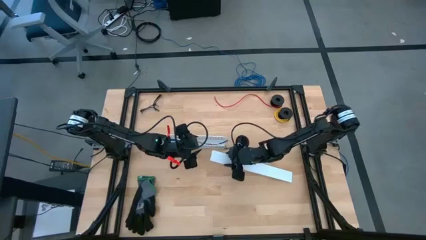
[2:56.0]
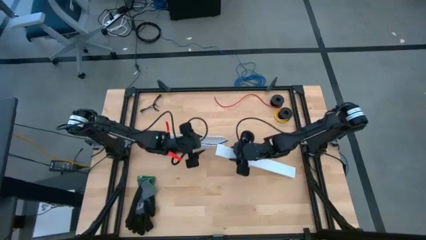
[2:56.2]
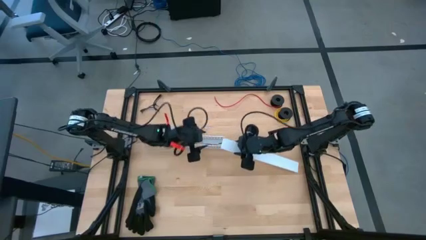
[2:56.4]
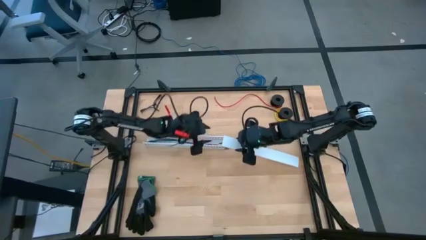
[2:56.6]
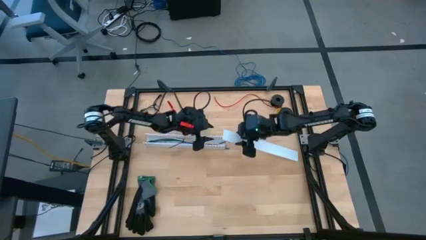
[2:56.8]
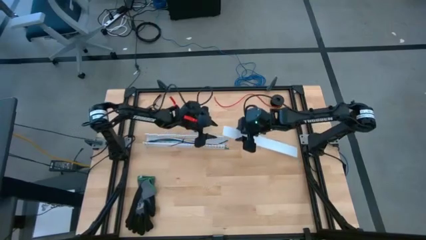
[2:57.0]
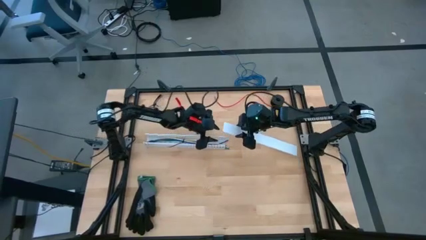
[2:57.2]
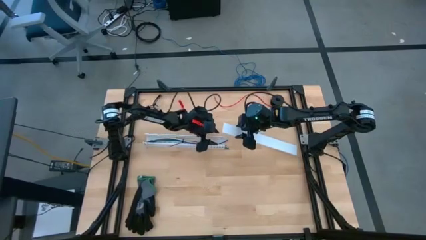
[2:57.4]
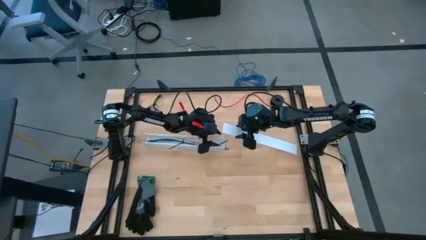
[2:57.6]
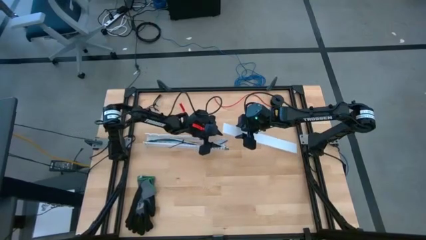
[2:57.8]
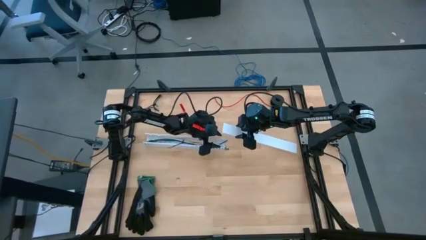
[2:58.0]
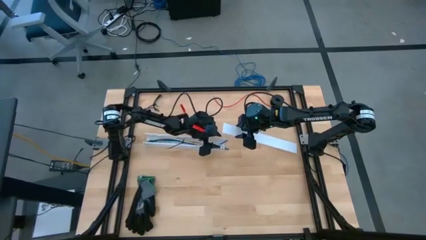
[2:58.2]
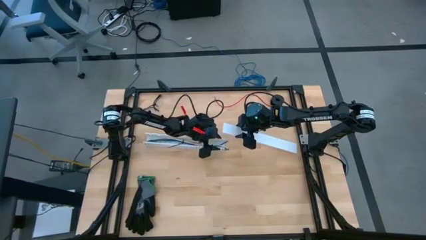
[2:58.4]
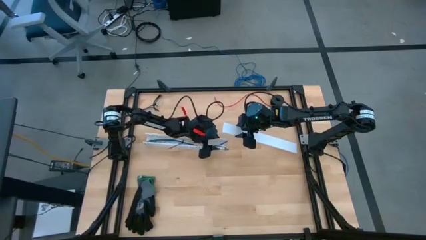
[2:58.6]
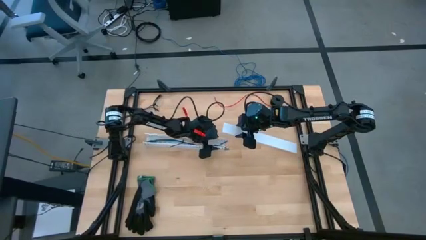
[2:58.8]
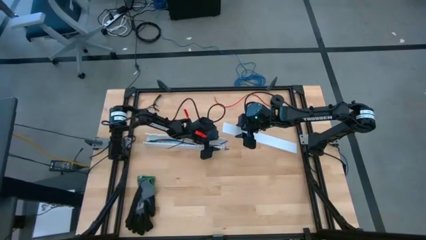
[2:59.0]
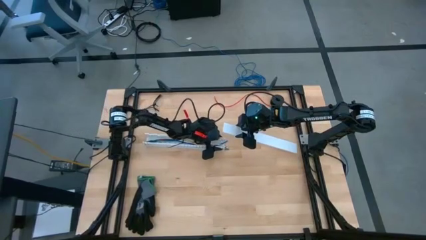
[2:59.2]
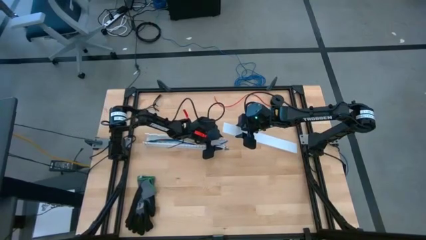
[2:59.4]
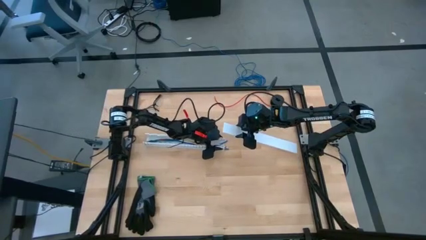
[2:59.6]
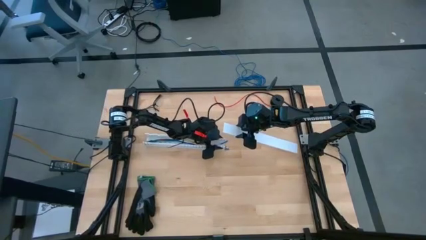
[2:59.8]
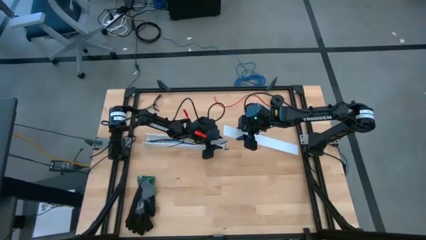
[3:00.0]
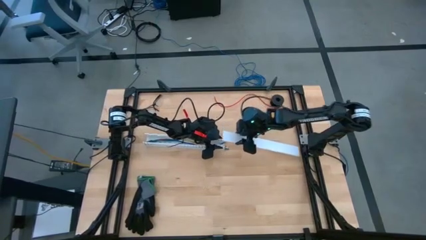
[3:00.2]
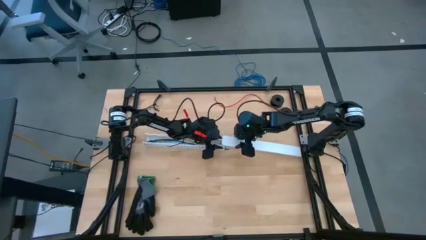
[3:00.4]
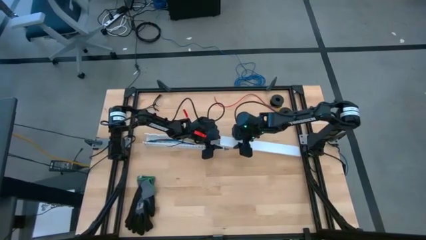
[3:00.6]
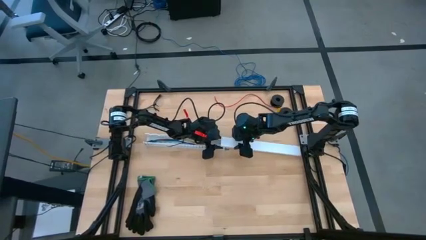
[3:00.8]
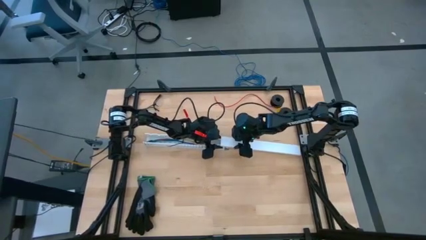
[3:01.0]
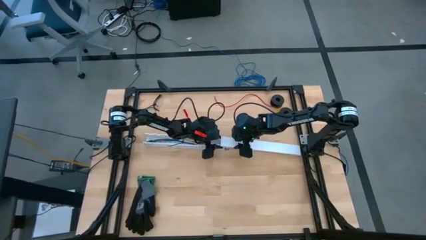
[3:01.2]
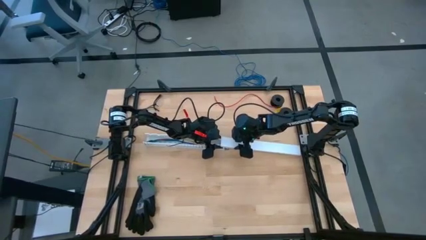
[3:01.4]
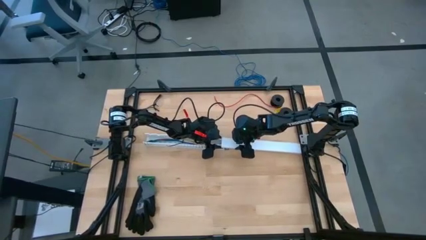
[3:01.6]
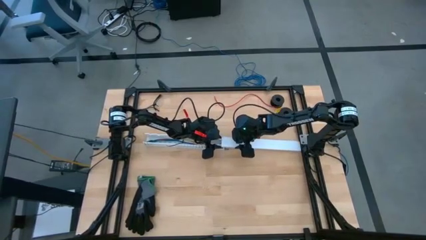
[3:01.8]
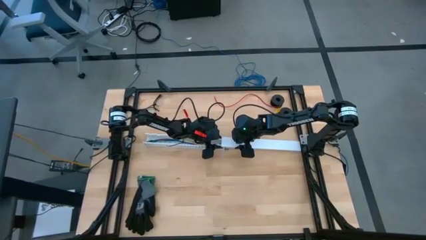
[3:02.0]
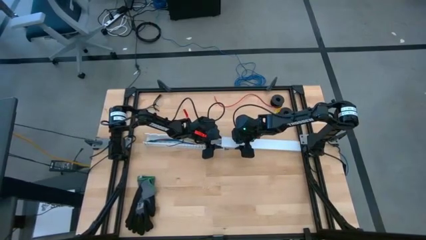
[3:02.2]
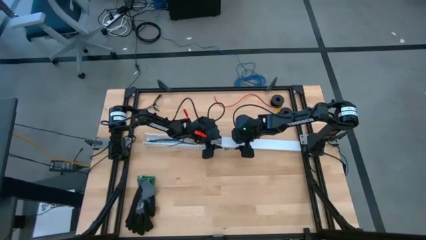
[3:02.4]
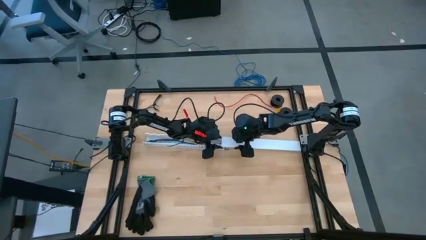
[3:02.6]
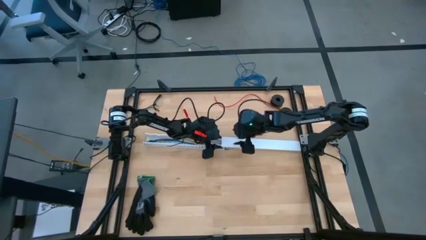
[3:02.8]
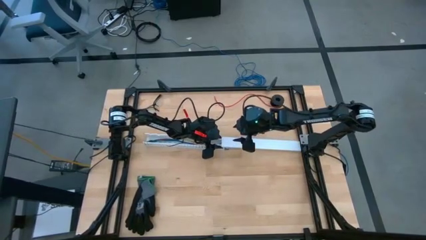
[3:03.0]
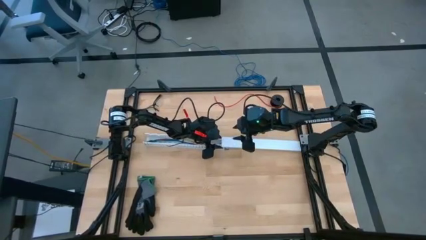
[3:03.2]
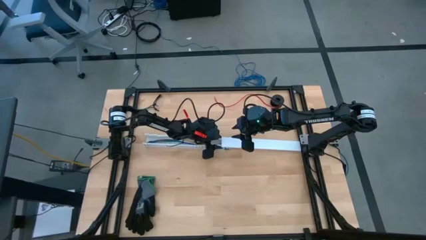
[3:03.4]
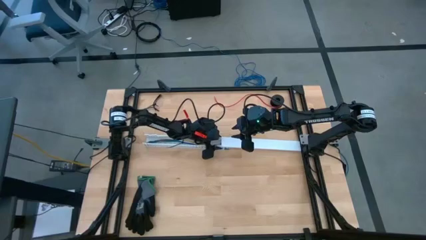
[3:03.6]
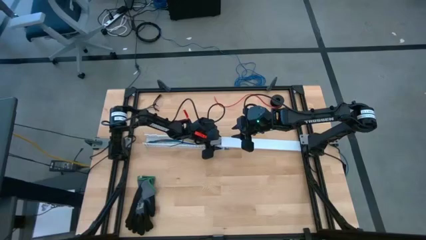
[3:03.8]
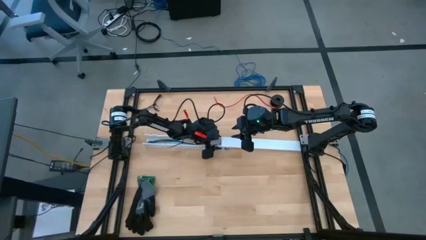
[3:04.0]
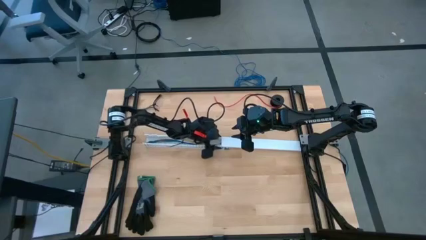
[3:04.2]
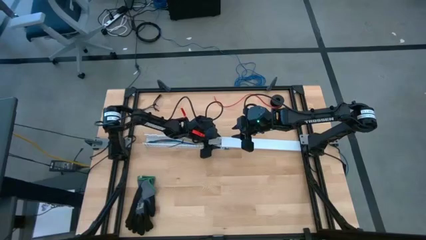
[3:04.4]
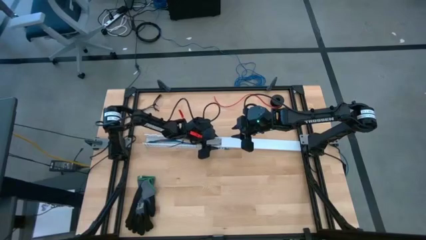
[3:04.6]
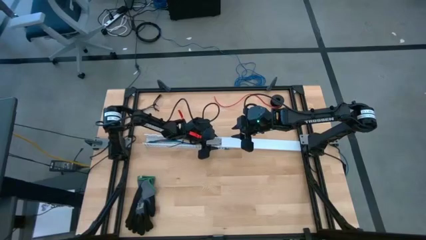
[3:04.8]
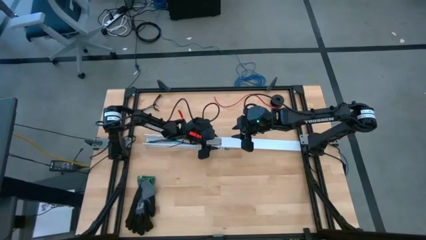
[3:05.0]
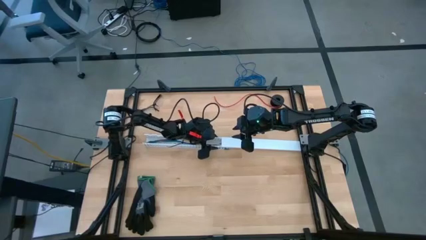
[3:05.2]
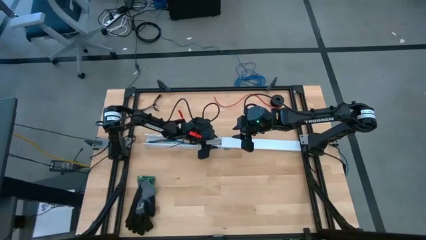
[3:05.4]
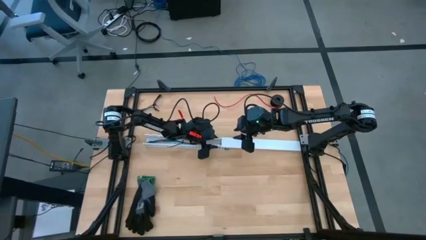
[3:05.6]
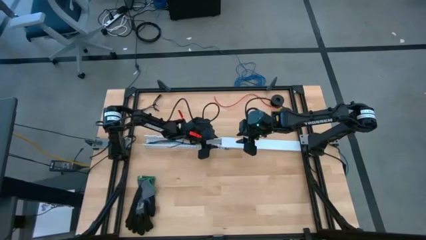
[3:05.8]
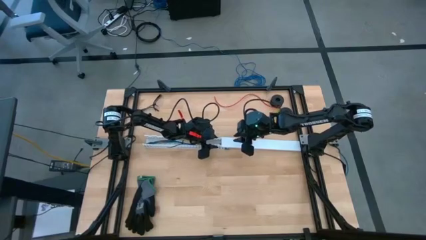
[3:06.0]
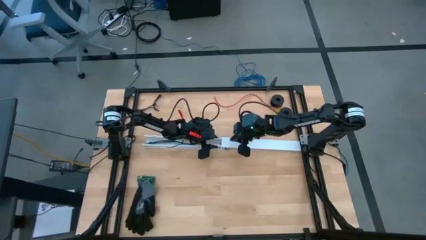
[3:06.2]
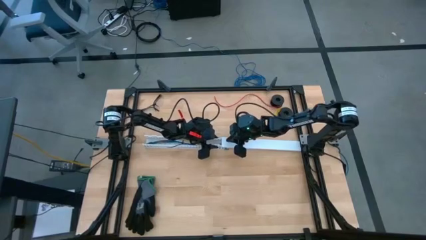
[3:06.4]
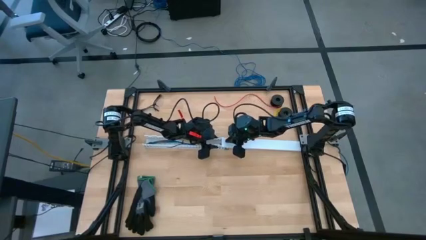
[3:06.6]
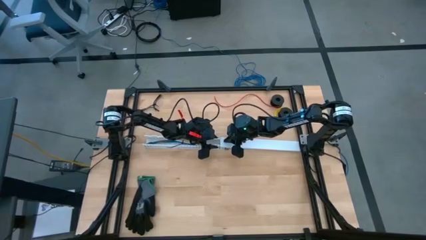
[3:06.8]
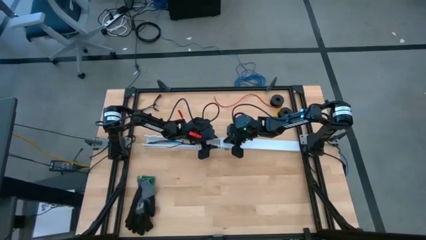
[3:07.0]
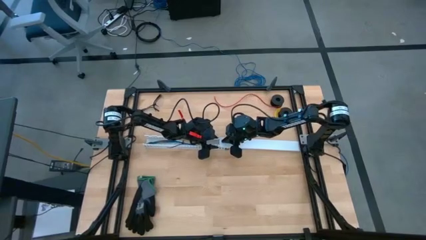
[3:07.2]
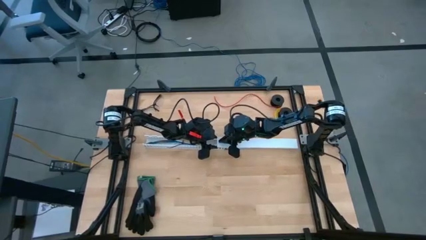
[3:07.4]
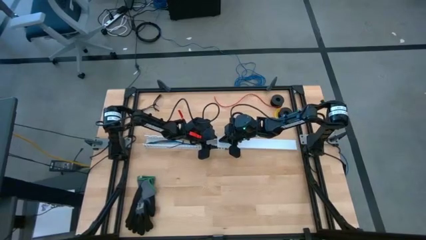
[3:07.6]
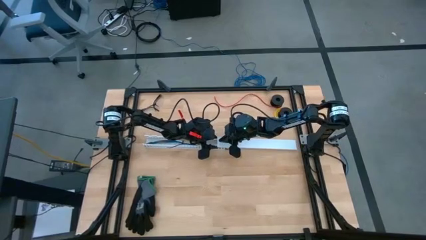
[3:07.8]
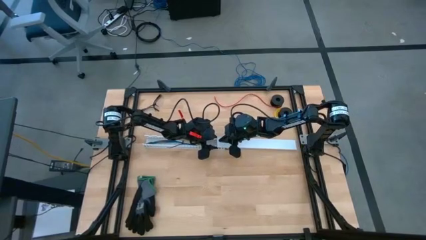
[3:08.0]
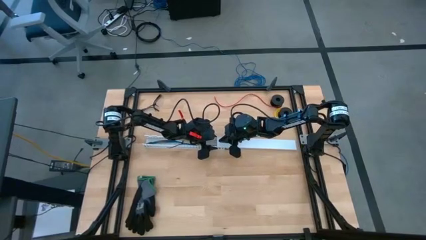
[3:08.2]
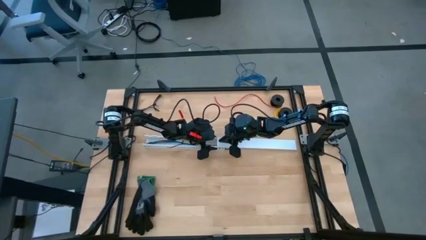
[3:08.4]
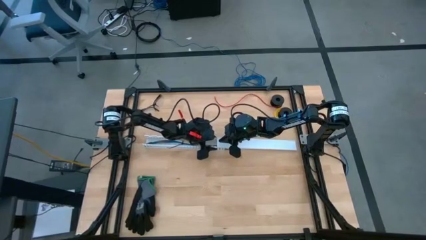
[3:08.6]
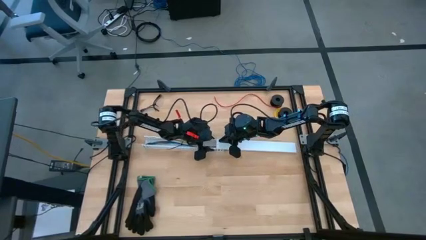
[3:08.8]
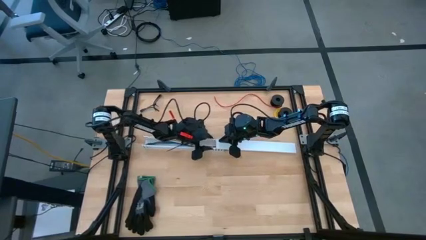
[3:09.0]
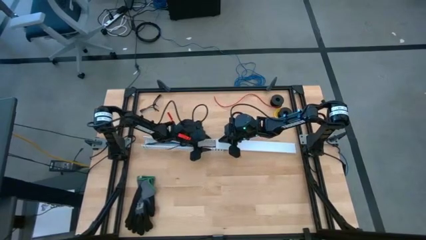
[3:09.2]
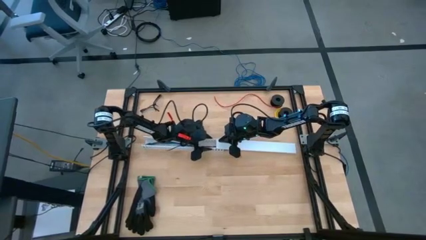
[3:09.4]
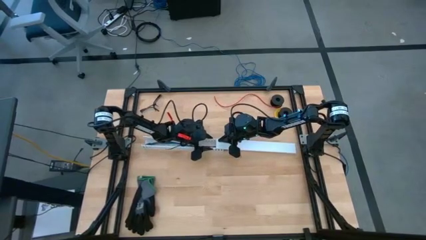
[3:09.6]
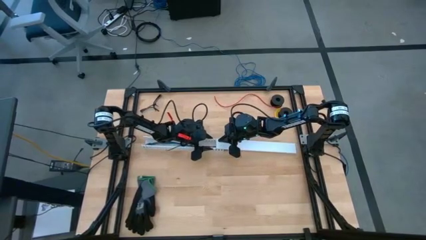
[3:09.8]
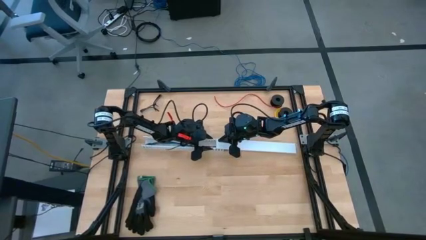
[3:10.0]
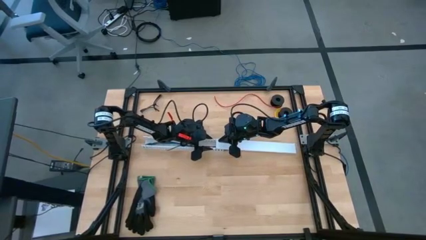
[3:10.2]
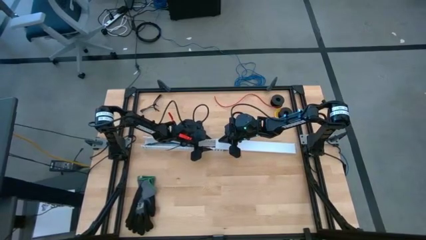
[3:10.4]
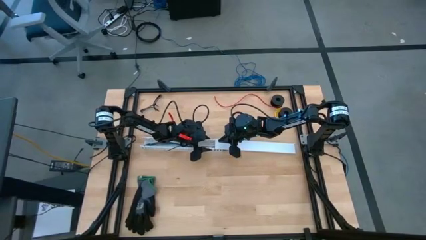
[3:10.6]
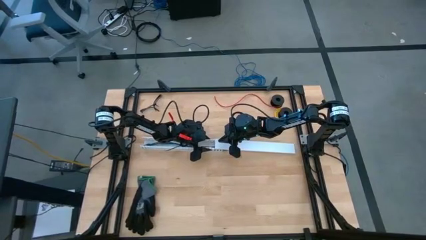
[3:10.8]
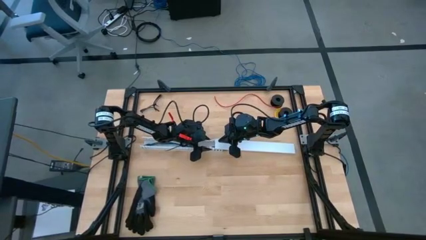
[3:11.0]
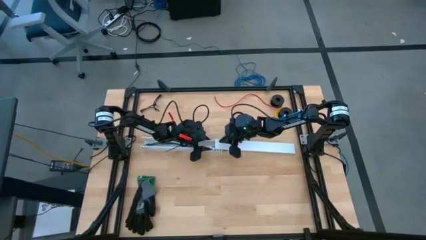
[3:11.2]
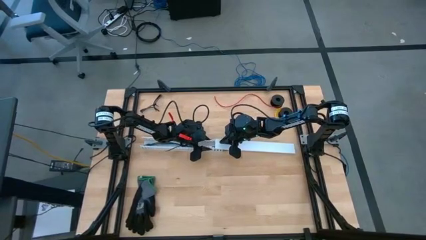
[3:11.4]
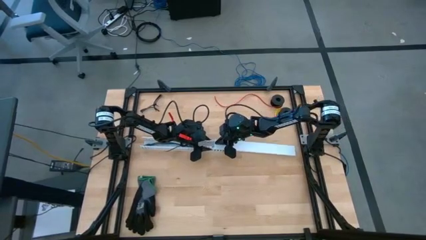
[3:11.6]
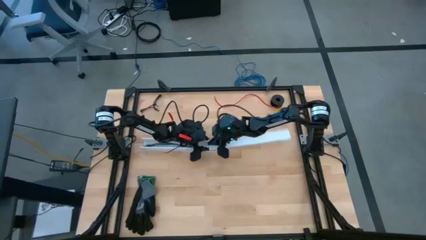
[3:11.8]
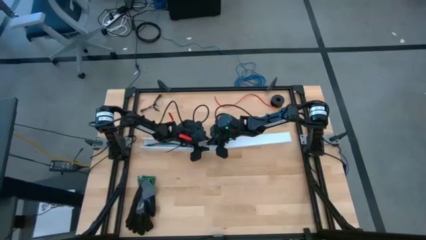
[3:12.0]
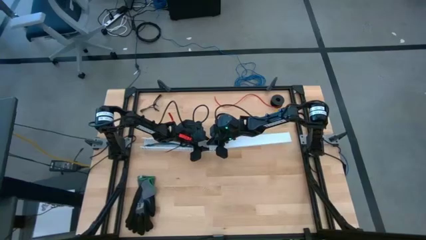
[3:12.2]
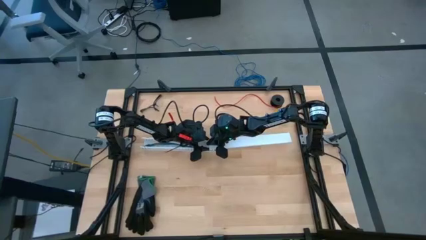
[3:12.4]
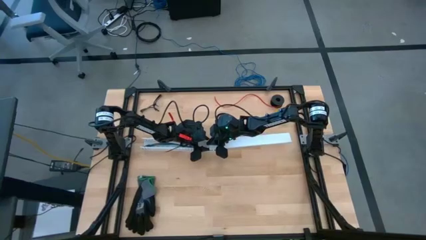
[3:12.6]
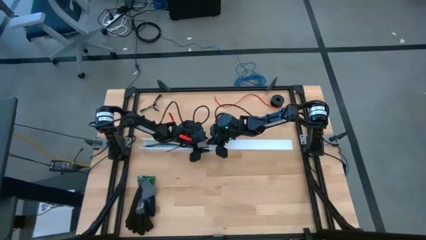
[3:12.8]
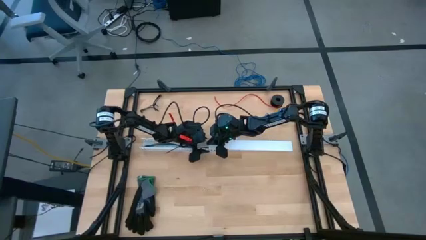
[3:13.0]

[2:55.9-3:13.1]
Task: Ziptie cables
Close the cable duct
